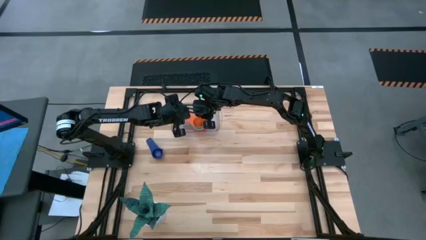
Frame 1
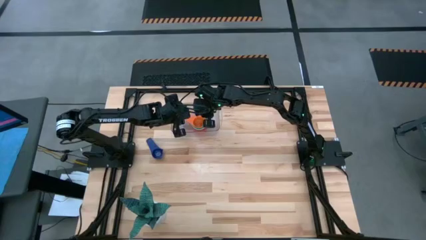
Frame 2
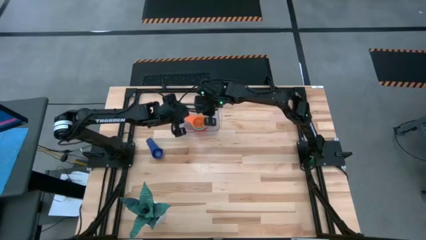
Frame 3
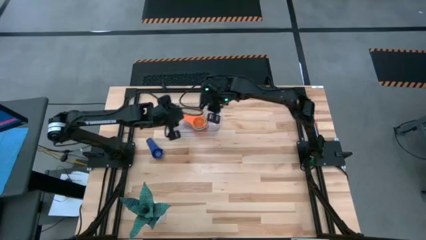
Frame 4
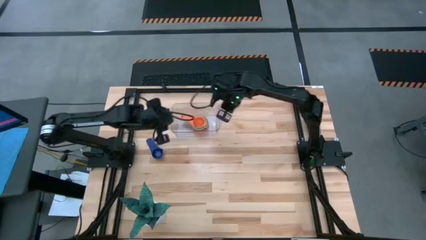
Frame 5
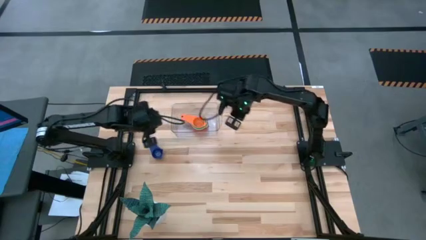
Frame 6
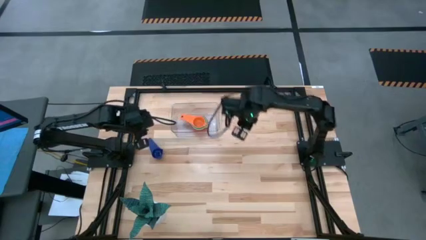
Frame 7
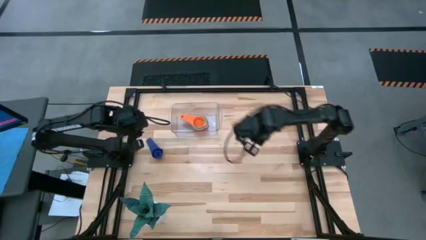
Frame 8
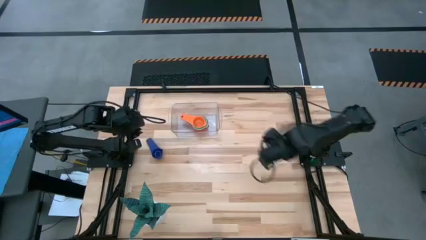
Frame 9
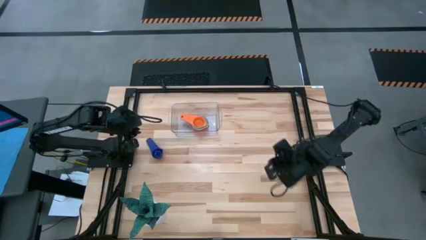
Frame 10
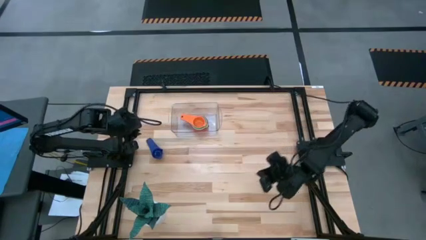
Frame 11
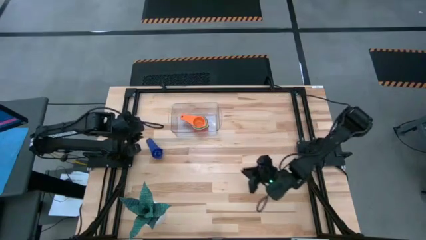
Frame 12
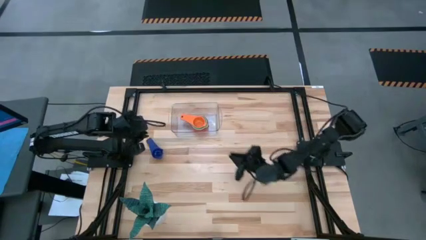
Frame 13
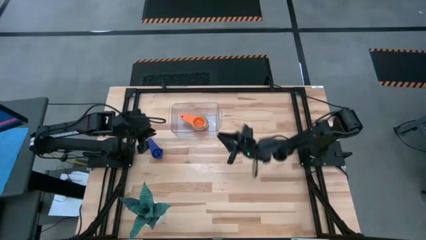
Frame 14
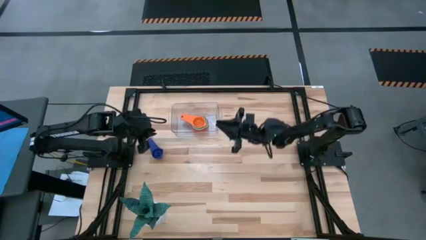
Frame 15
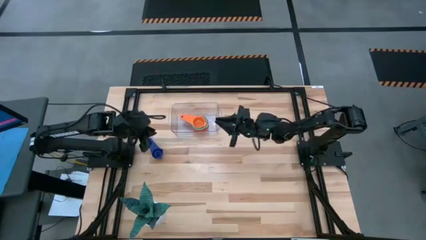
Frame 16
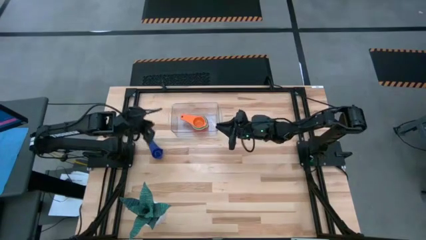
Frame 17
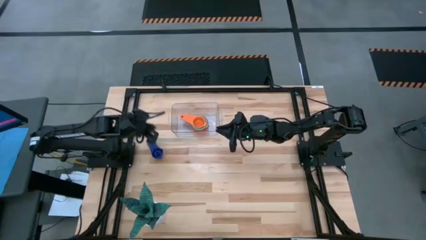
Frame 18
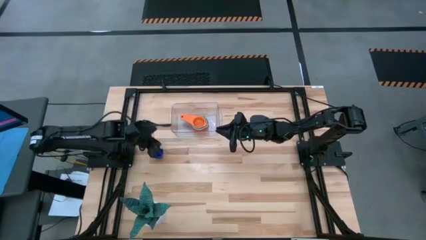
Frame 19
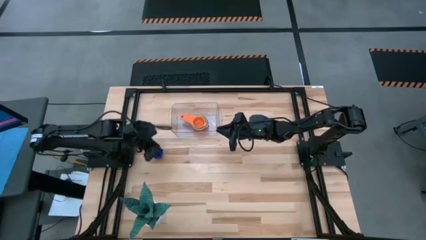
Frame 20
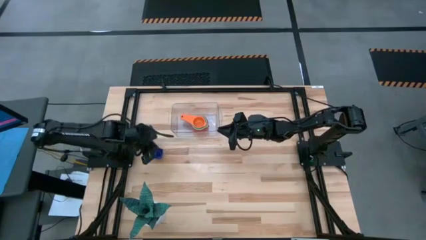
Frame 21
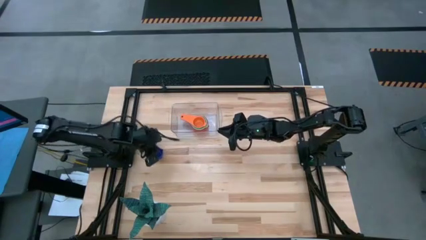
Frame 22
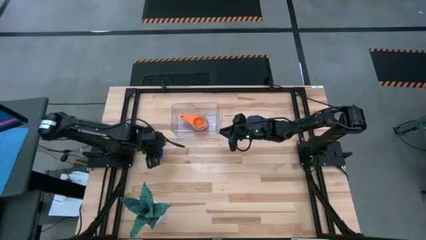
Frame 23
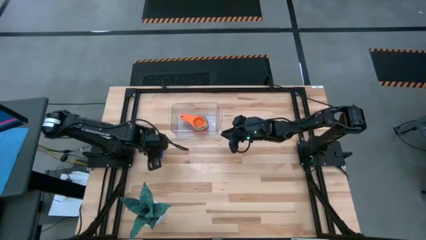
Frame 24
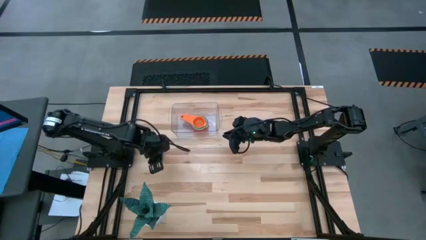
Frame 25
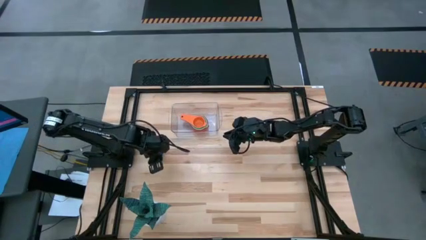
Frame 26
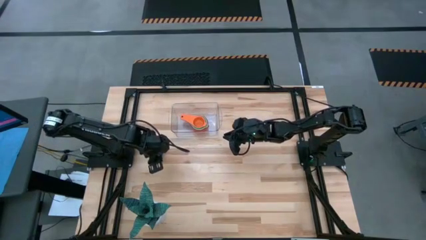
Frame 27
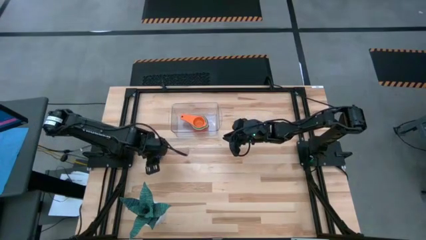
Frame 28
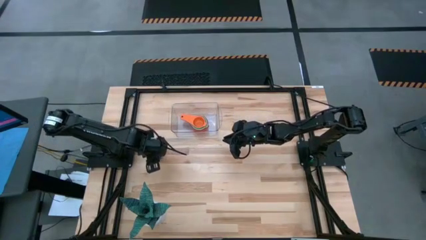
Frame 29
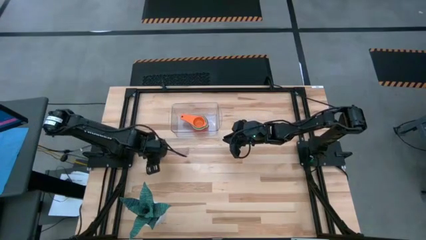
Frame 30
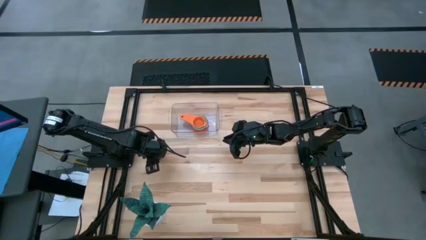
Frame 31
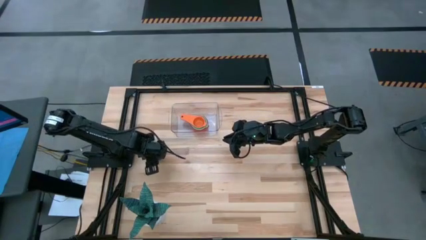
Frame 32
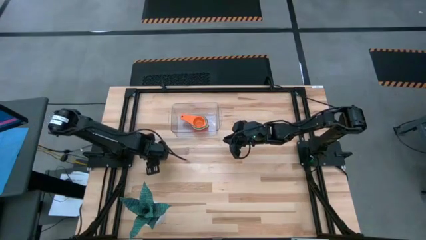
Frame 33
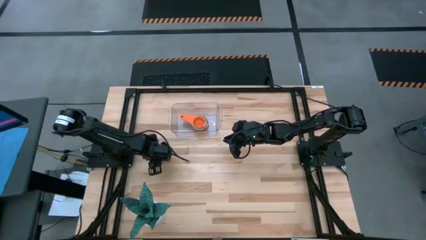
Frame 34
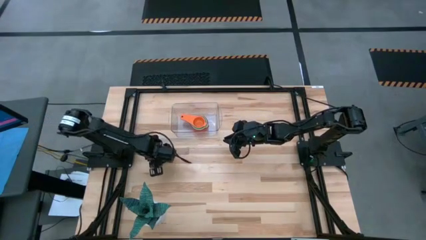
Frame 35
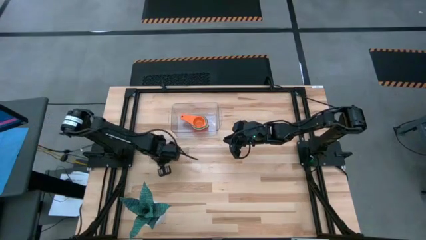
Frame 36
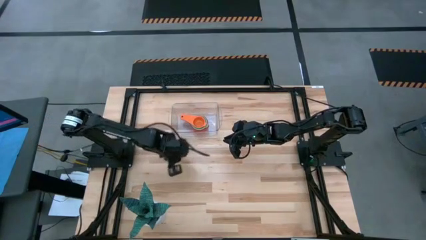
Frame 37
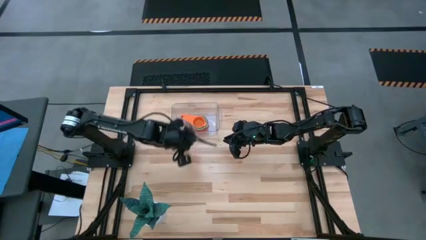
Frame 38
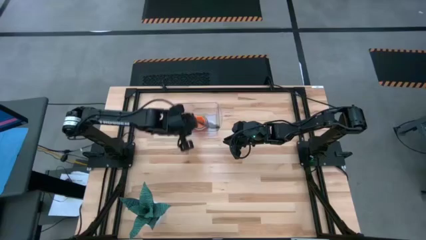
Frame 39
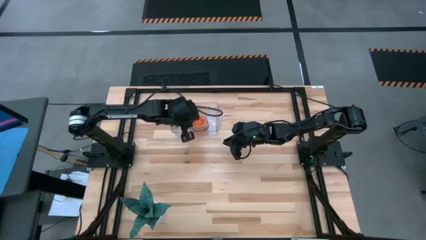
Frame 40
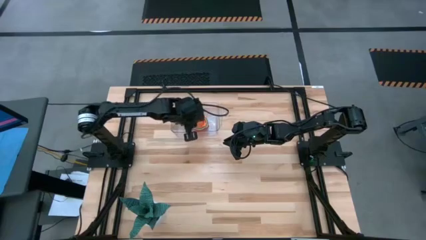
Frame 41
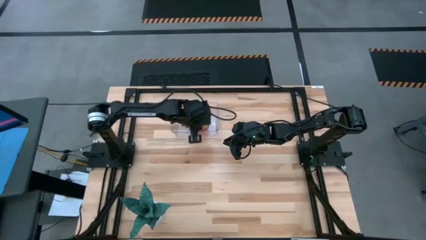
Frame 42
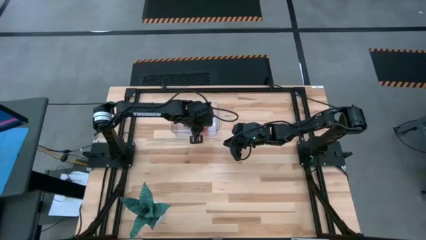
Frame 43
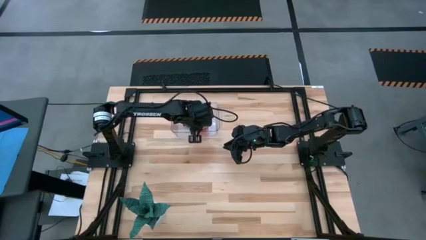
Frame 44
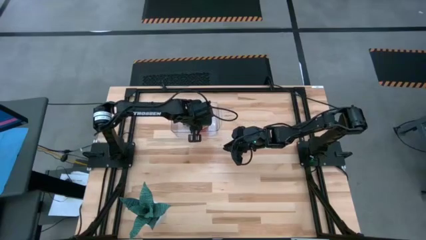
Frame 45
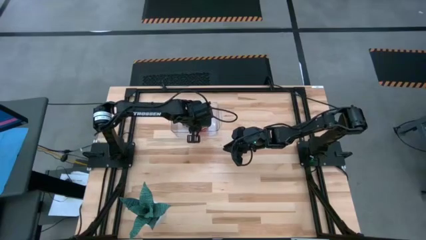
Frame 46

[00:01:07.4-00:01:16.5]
Task: Nest measuring cups in basket
Stack the dark blue measuring cup on top of the orange measuring cup into the transparent bin

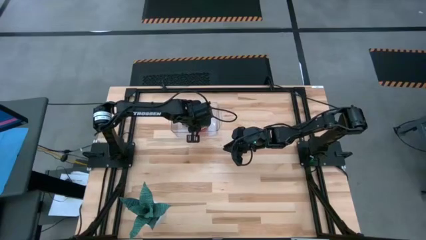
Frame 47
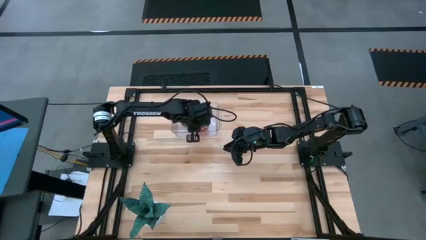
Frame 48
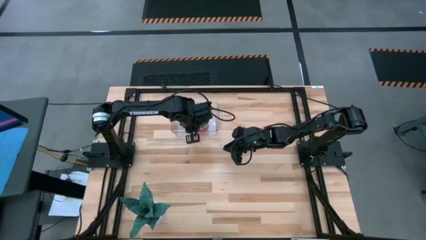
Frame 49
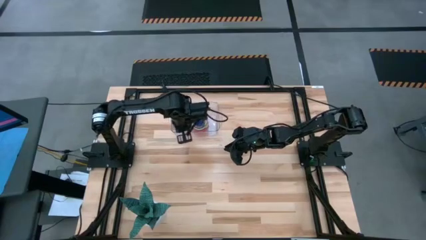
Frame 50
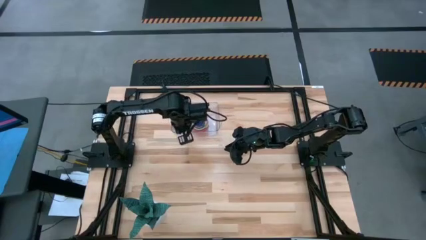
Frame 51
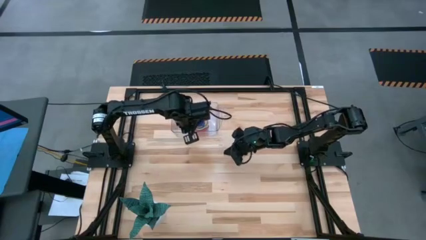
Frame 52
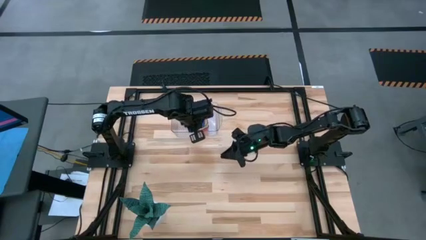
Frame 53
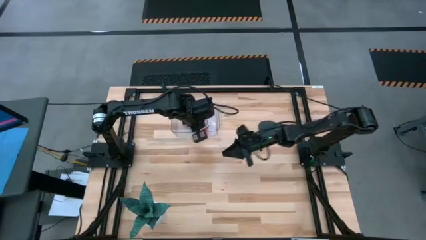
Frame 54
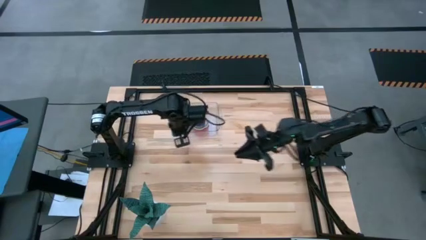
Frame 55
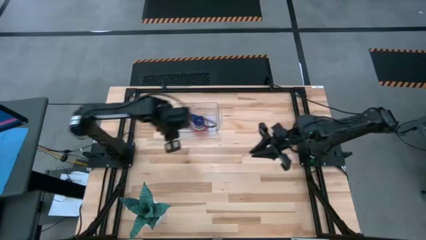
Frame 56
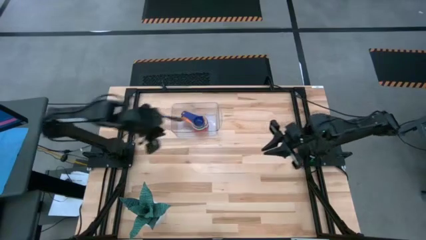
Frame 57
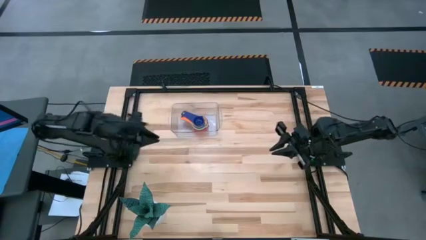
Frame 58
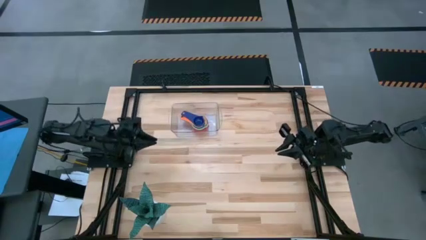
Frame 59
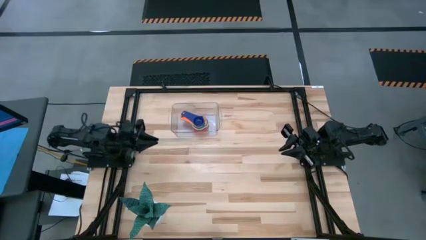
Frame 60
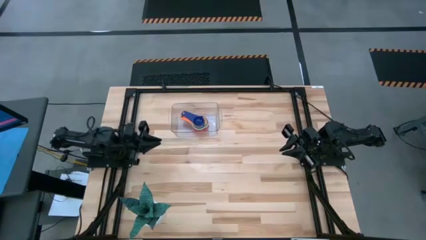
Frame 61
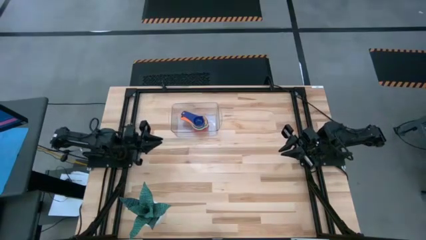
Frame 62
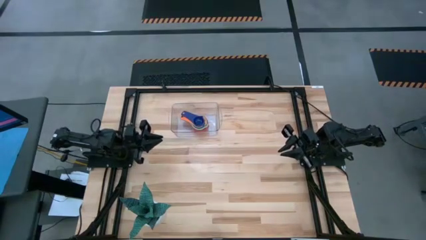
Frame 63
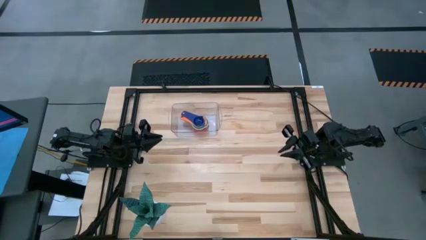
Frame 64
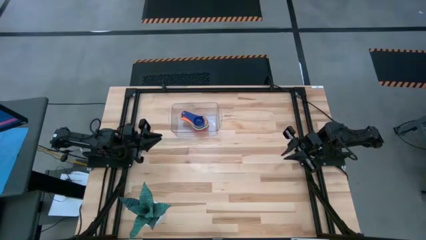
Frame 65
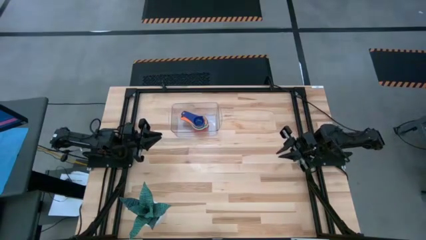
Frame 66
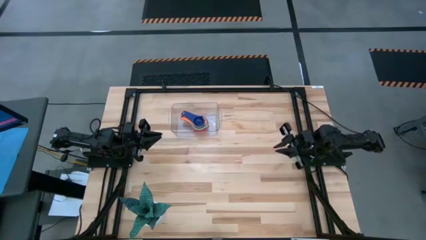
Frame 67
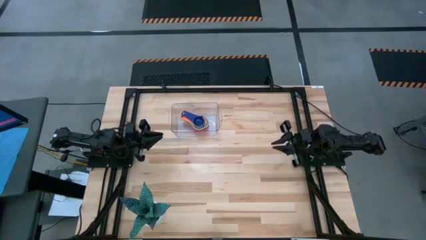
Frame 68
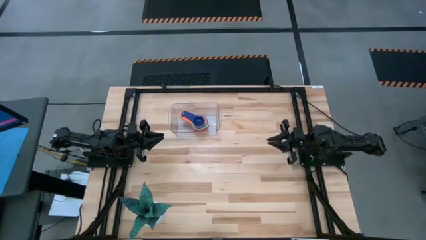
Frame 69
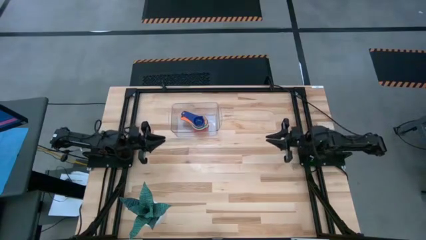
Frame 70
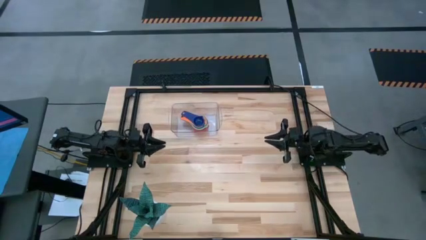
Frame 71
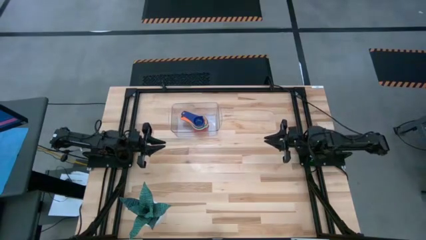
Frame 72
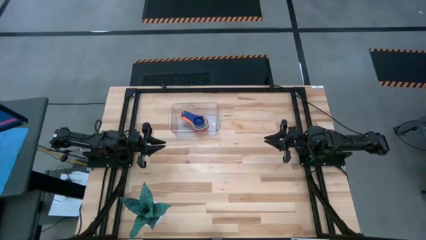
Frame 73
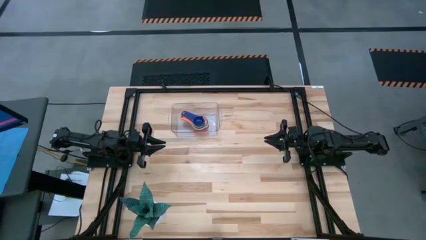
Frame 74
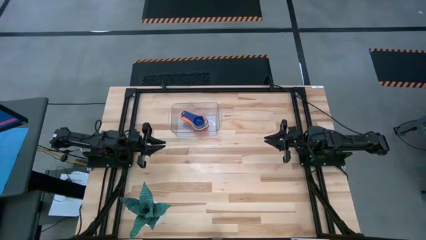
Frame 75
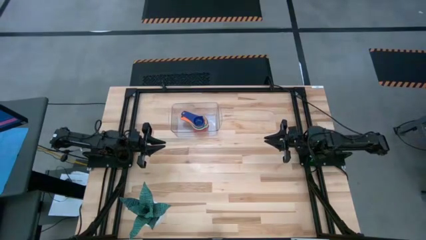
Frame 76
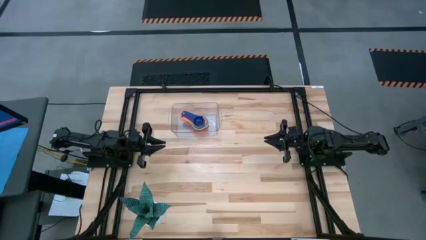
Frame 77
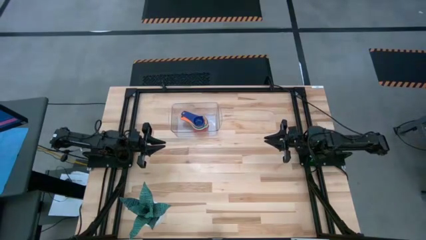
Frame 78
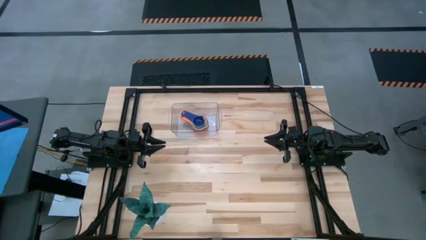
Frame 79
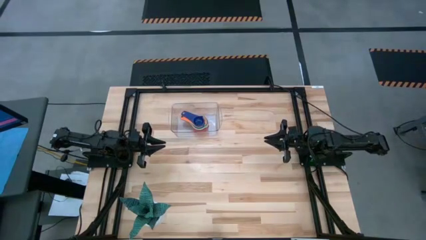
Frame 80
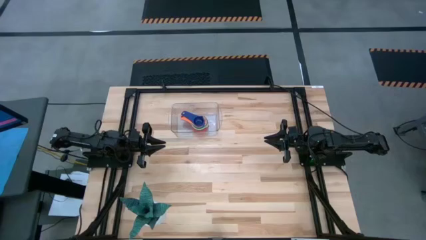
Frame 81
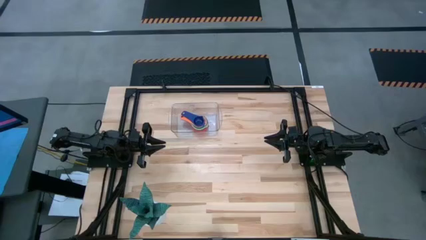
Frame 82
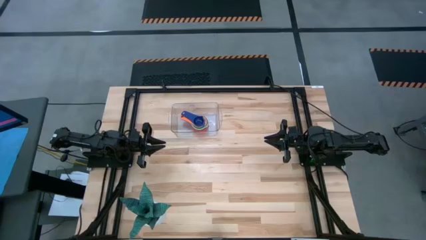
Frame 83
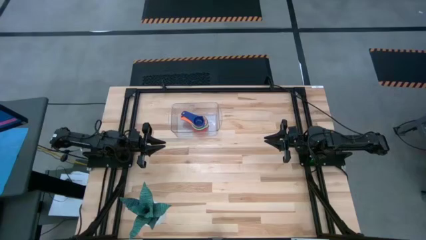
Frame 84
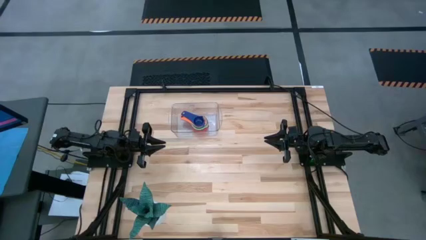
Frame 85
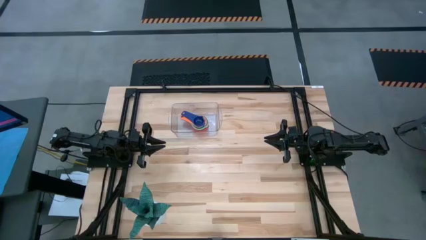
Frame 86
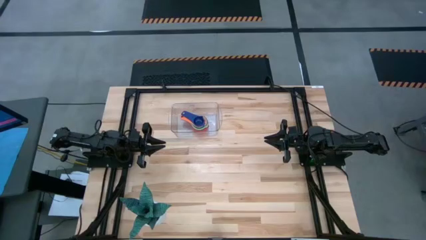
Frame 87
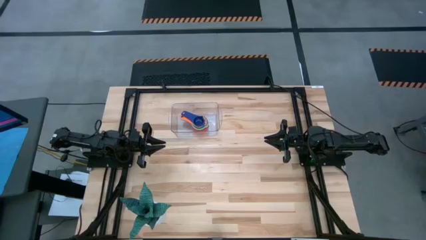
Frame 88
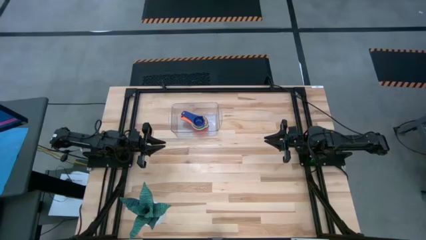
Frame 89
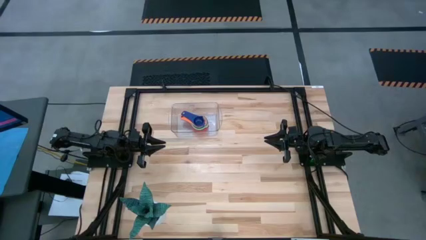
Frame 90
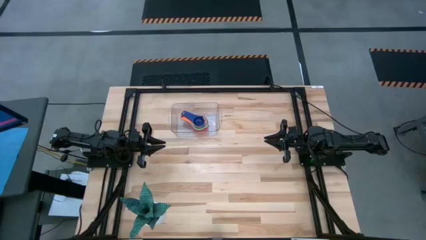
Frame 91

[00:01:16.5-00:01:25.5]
Return to Home Position
